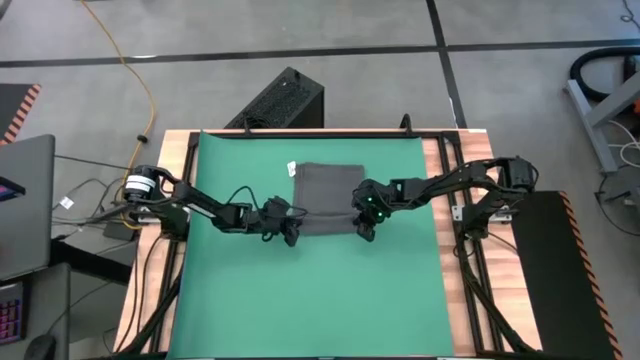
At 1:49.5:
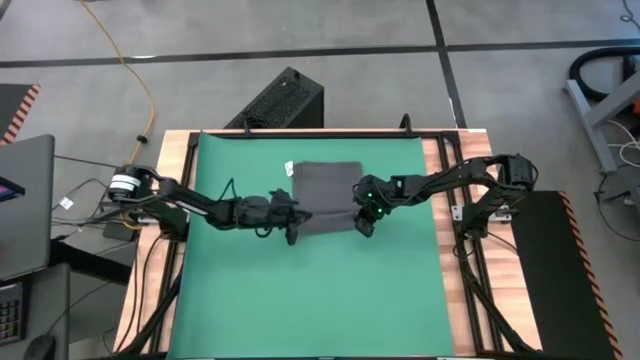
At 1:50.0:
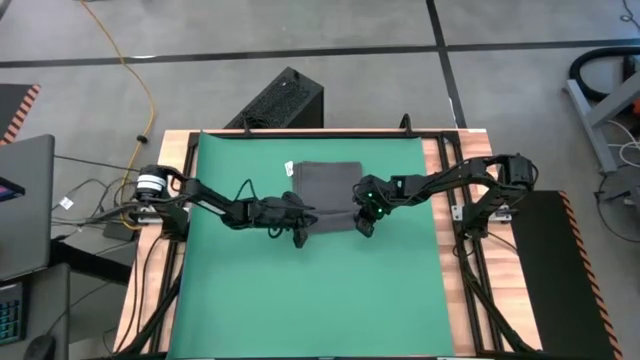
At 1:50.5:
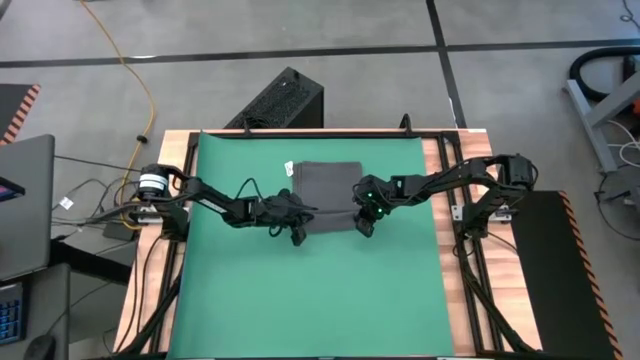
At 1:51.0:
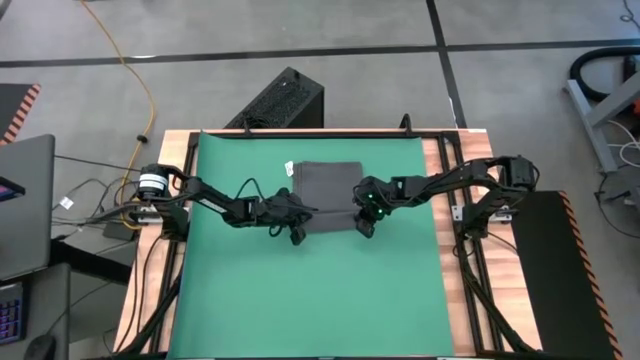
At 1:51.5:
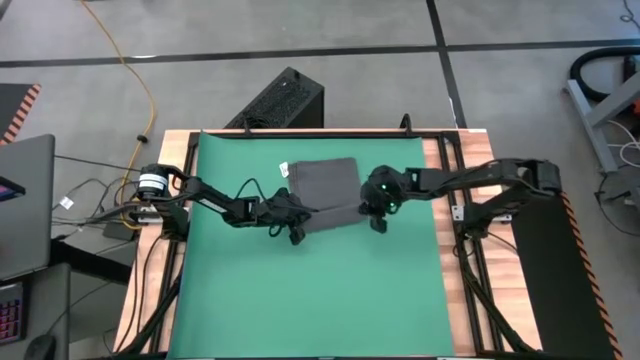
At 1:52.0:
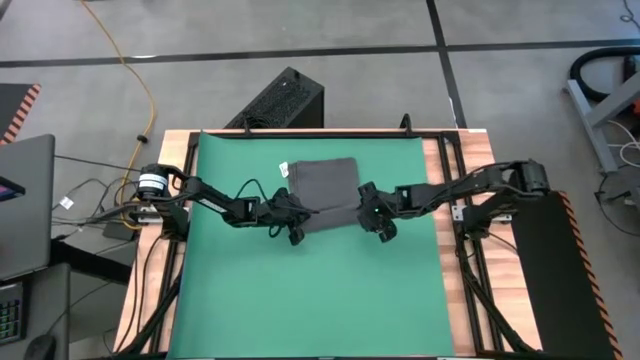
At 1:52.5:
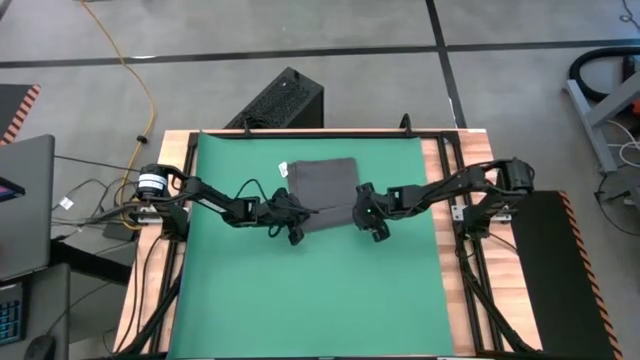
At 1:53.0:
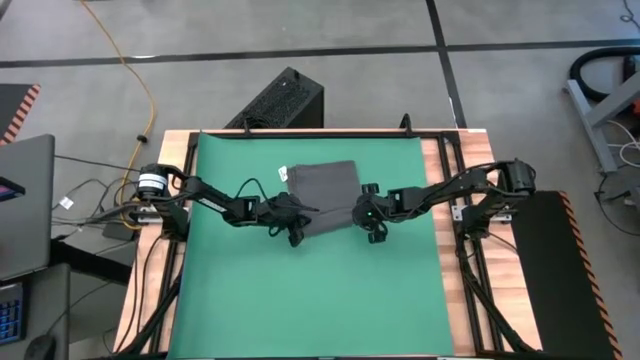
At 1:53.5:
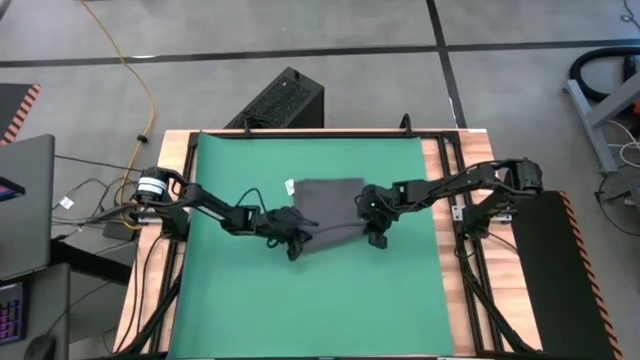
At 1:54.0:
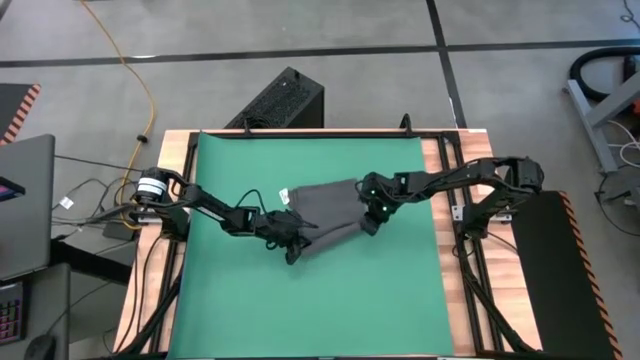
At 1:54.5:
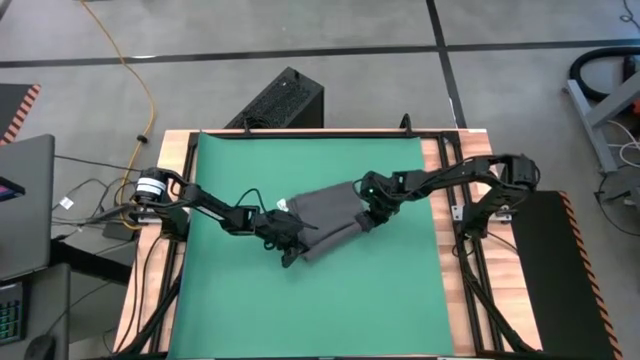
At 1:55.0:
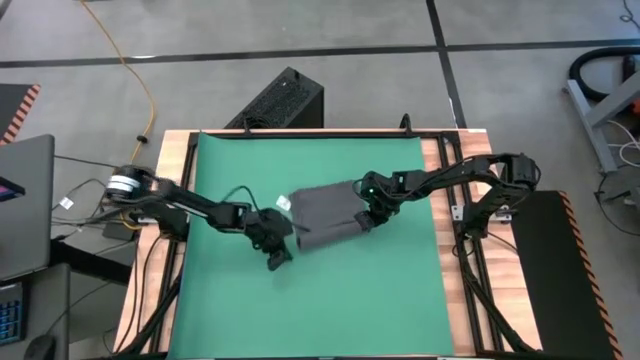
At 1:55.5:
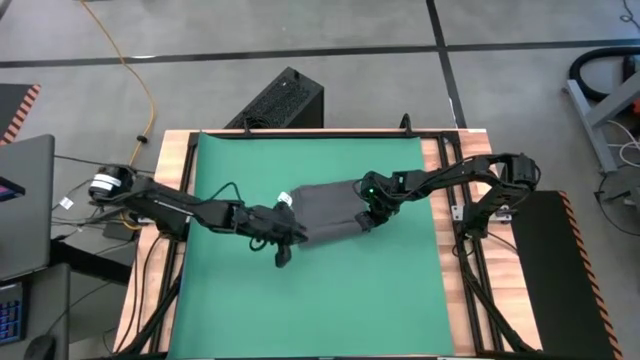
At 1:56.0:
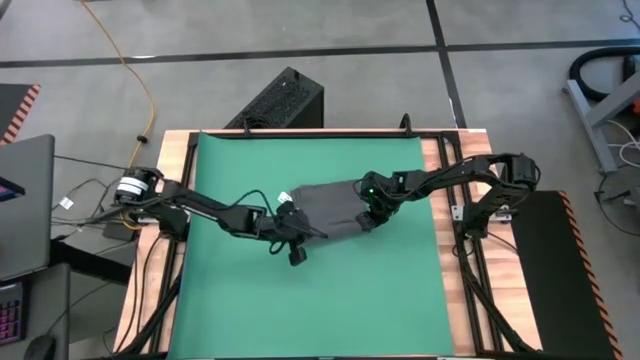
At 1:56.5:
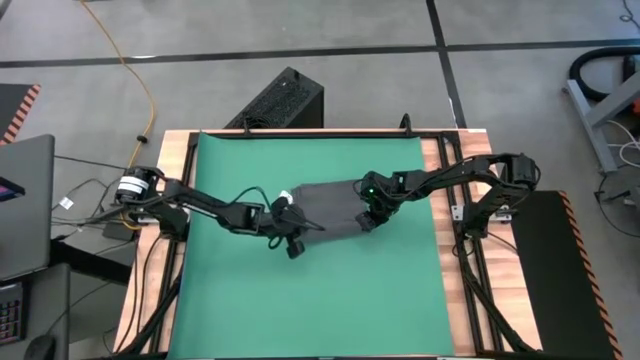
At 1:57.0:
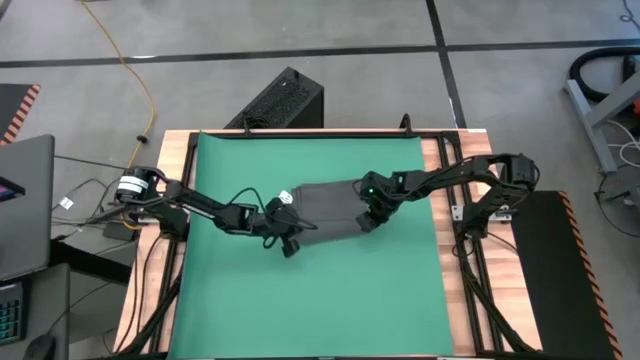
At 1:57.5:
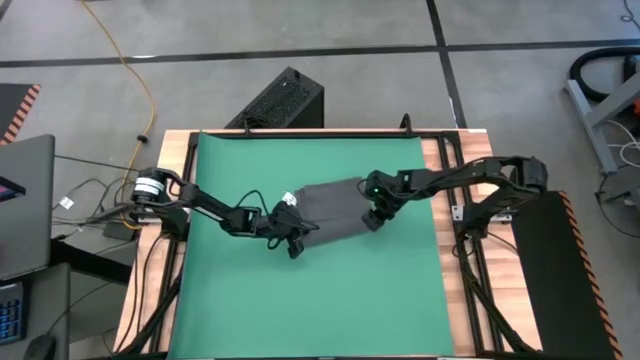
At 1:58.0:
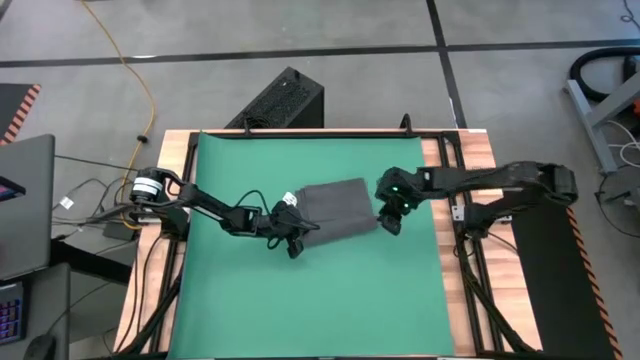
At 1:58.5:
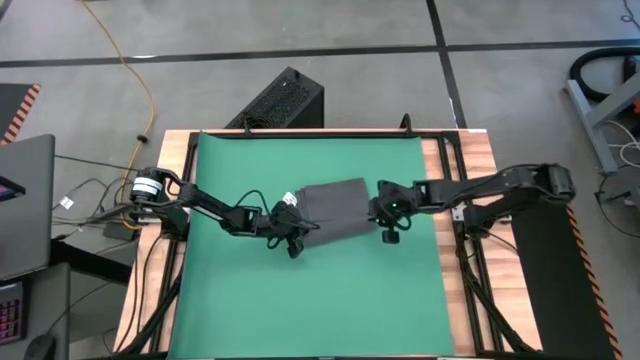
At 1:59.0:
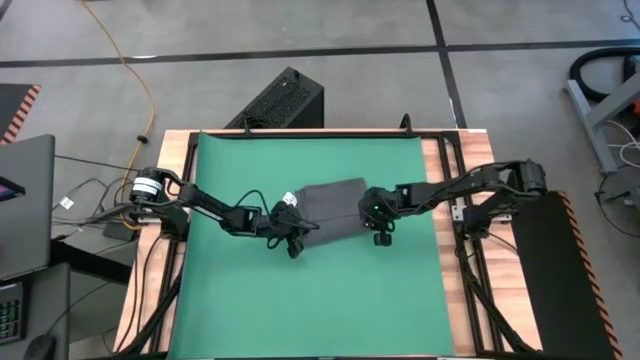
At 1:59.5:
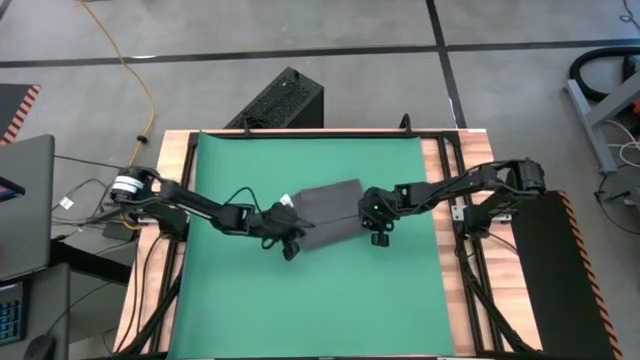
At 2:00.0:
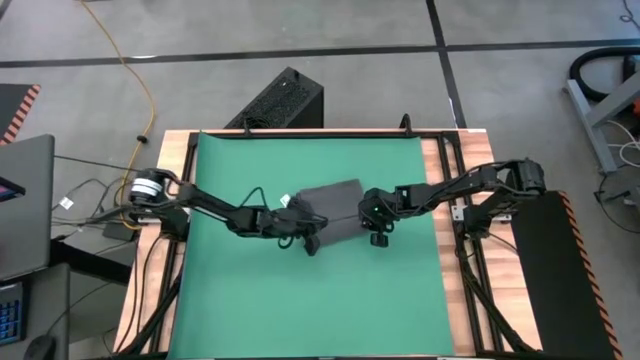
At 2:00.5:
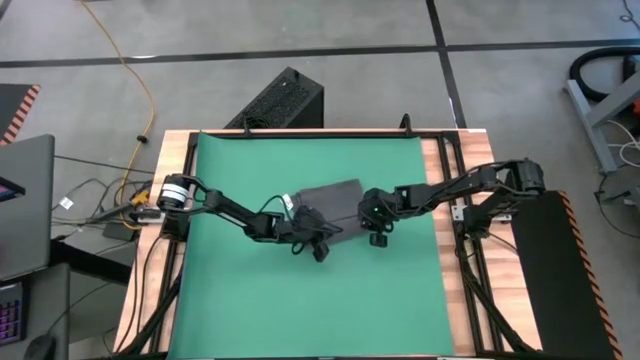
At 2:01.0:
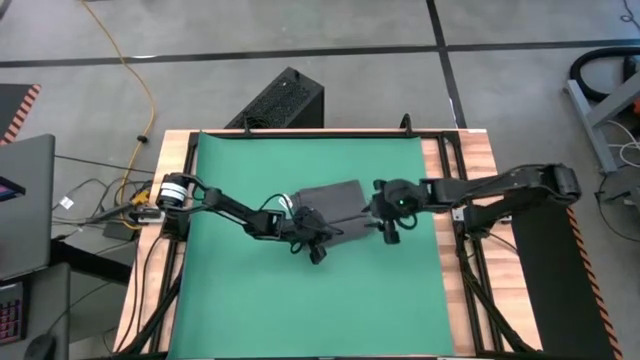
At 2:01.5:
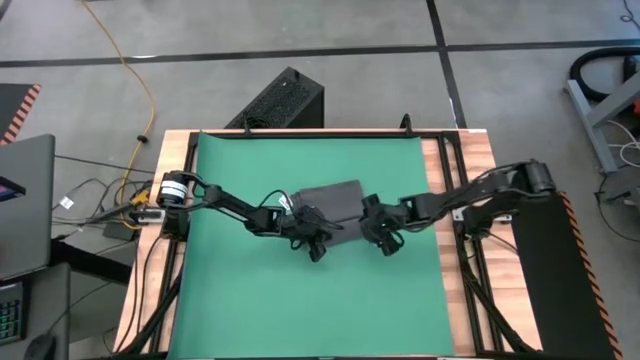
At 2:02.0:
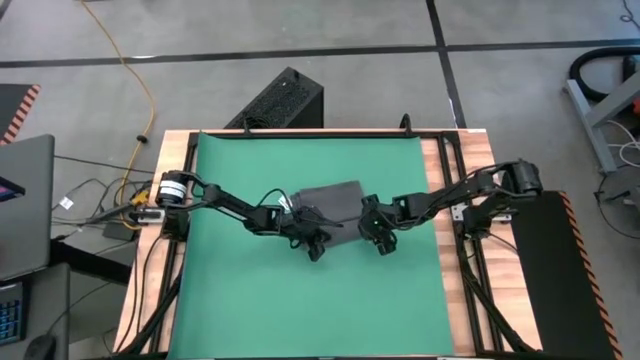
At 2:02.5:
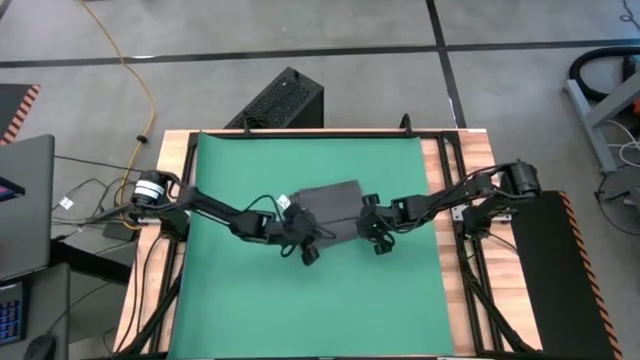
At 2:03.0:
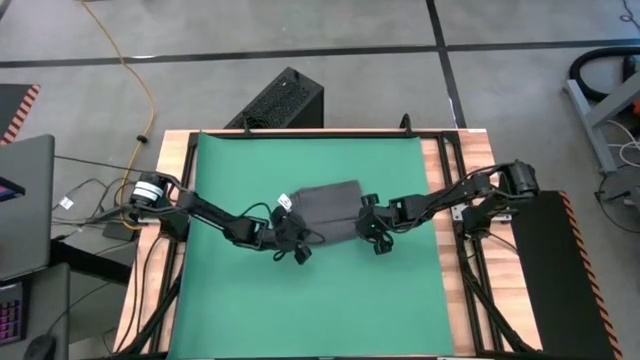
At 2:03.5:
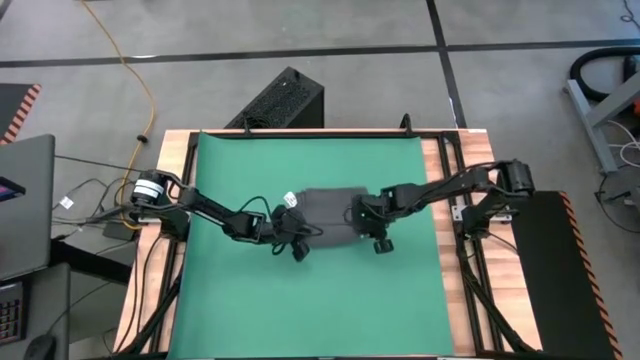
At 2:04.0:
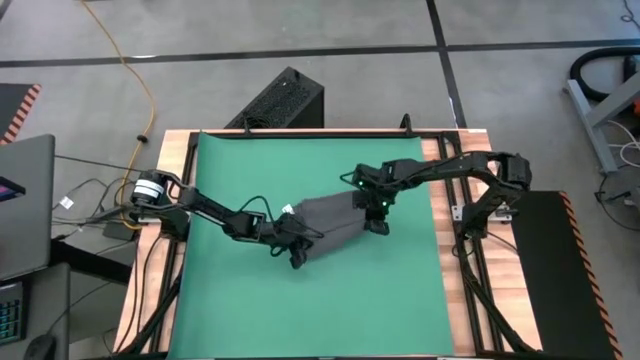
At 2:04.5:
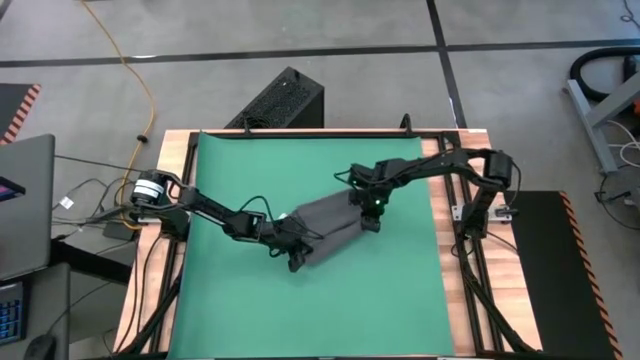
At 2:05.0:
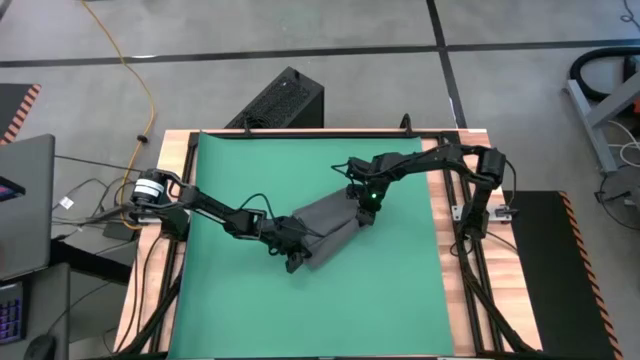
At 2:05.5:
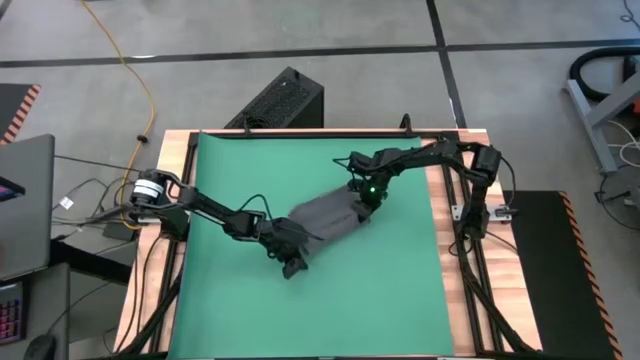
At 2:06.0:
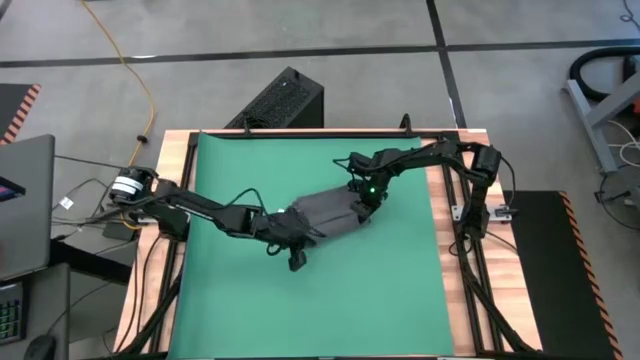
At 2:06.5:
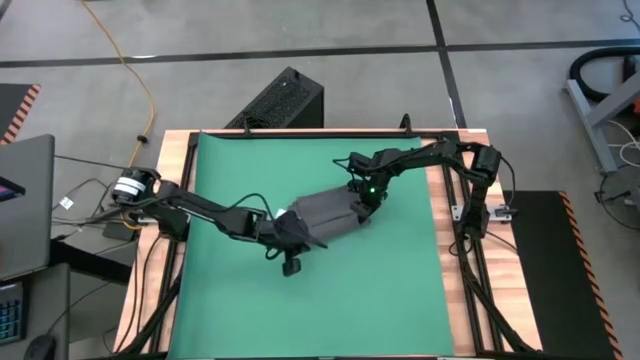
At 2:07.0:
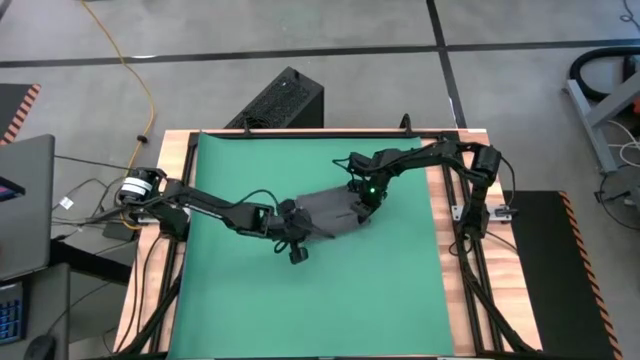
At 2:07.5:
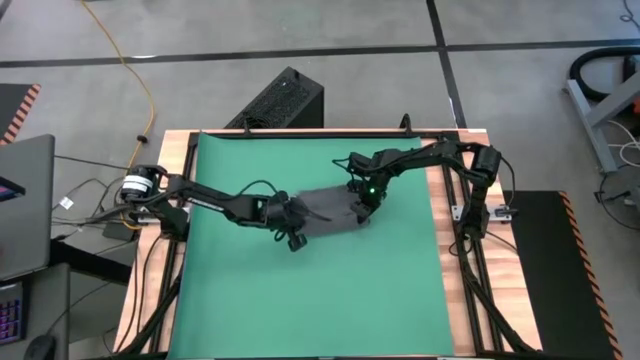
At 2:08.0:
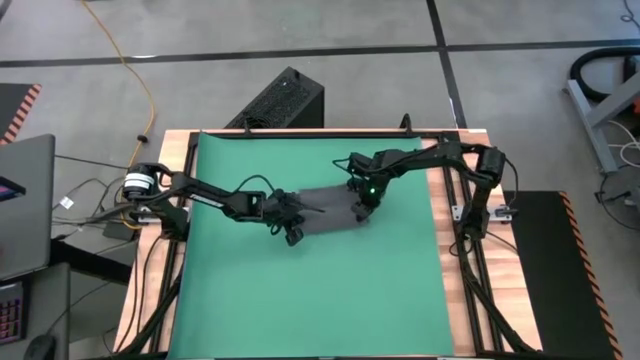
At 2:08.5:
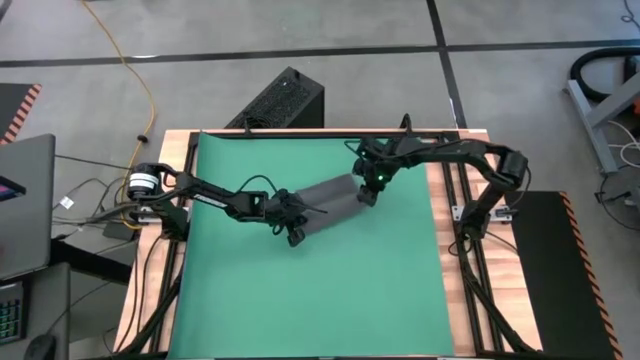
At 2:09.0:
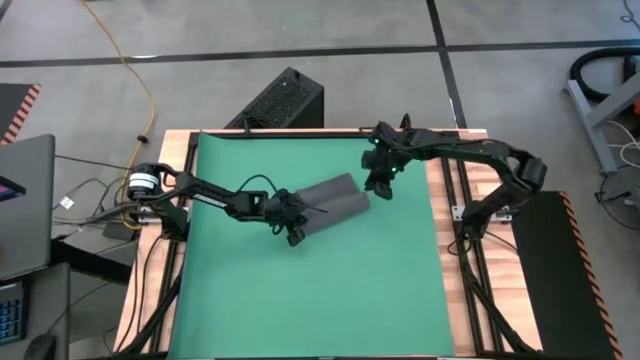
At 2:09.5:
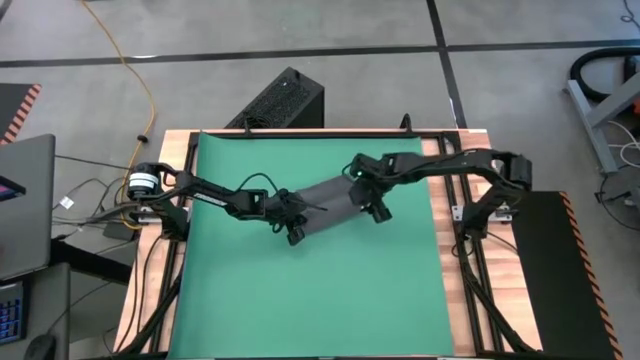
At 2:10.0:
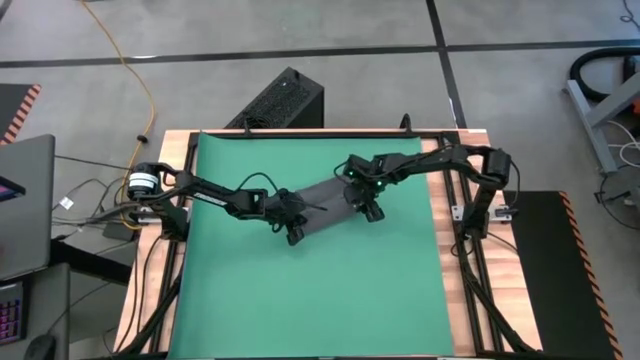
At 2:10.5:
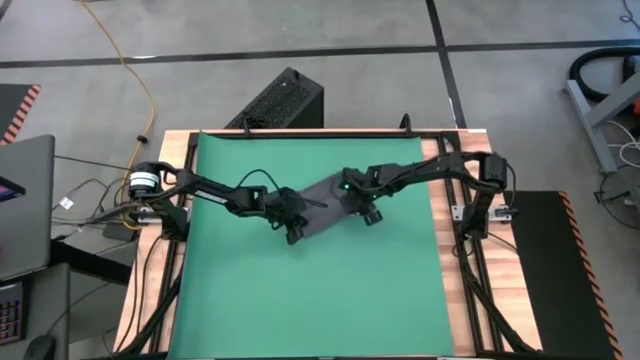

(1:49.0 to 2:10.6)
Task: Roll towel into tight, uniform cylinder
Roll the gray towel
